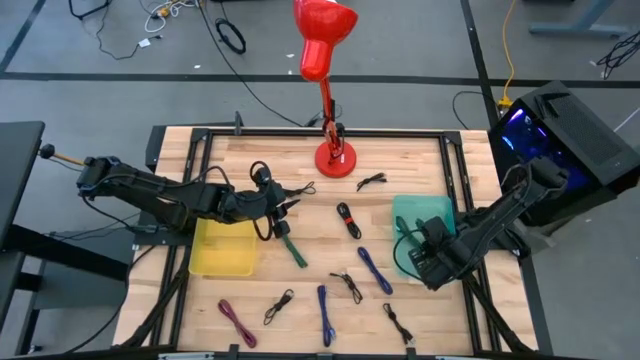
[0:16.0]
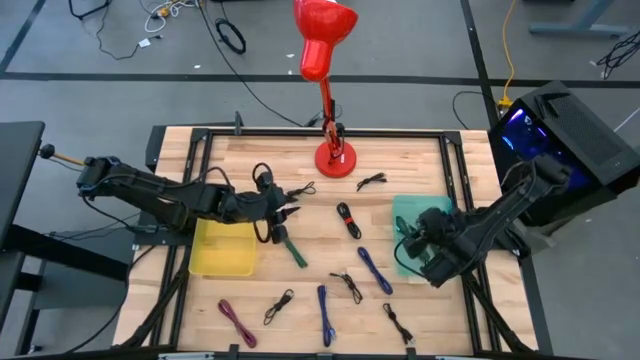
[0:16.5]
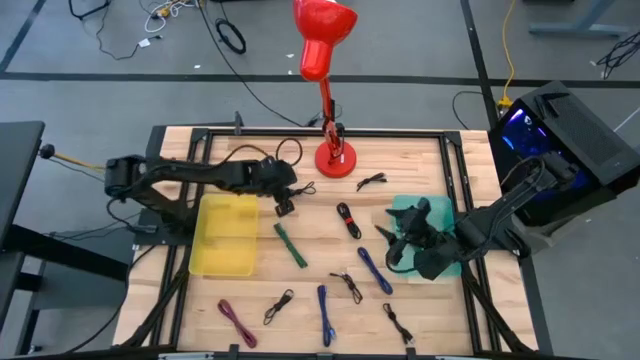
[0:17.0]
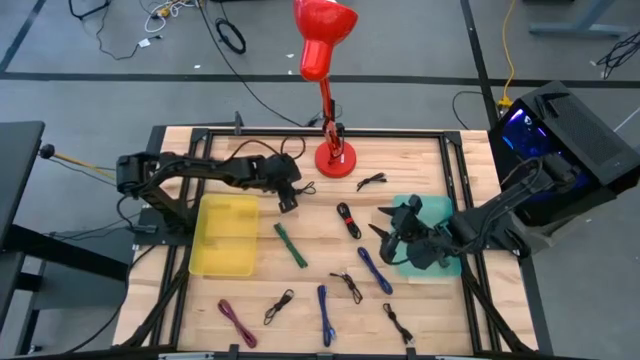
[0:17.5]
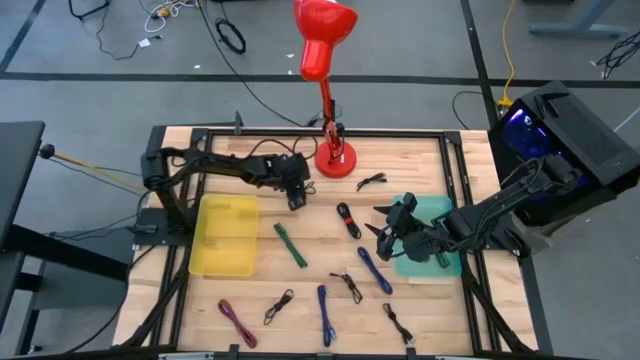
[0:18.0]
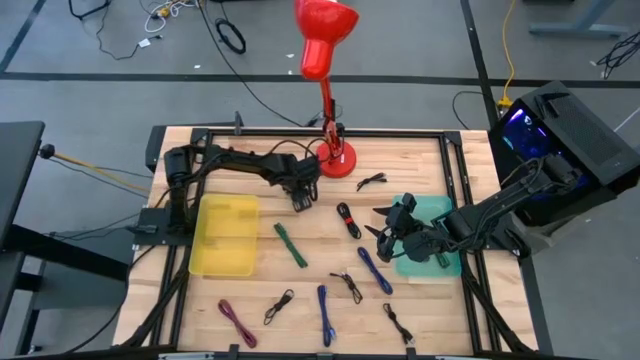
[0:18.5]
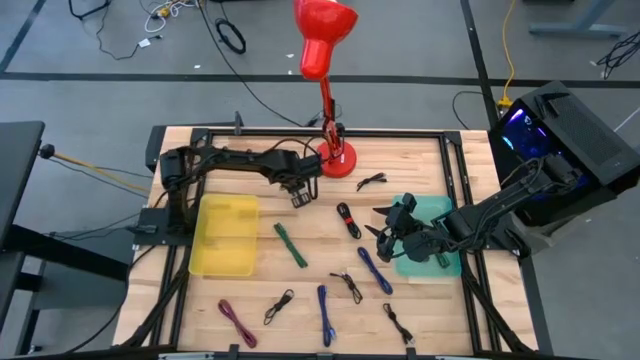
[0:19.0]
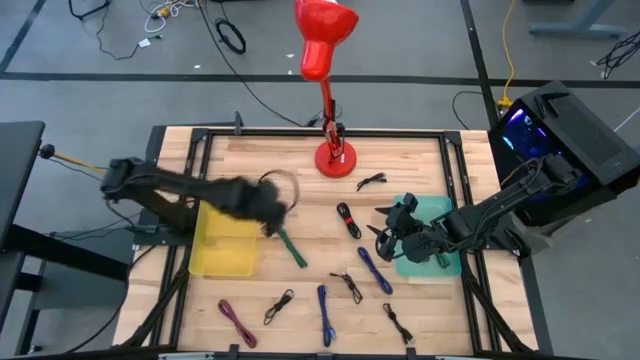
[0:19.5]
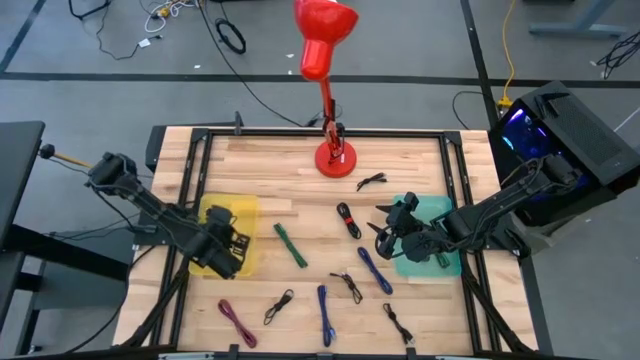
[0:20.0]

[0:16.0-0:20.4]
Task: Pick & Place USB Port
Put the black USB cable into the yellow transparent bin

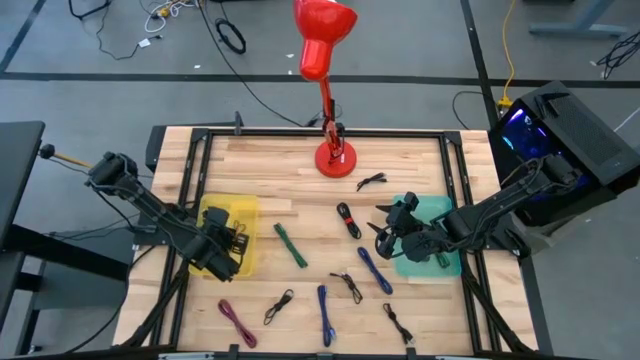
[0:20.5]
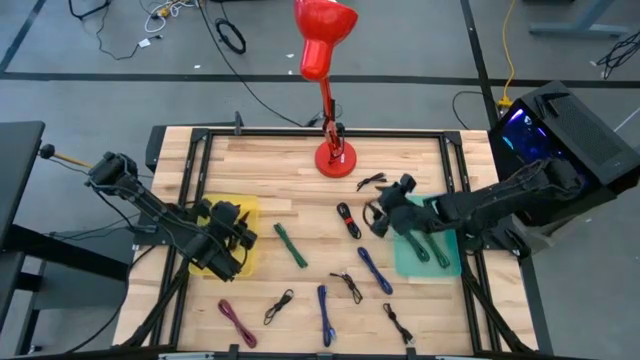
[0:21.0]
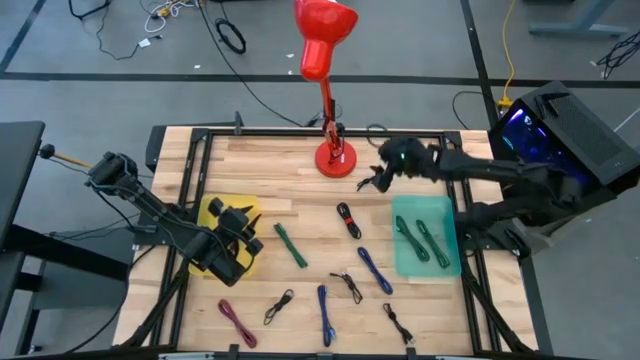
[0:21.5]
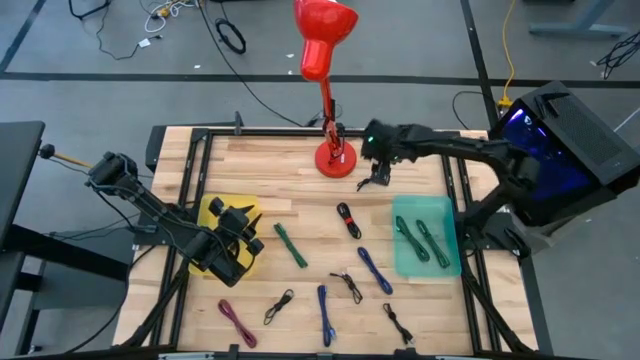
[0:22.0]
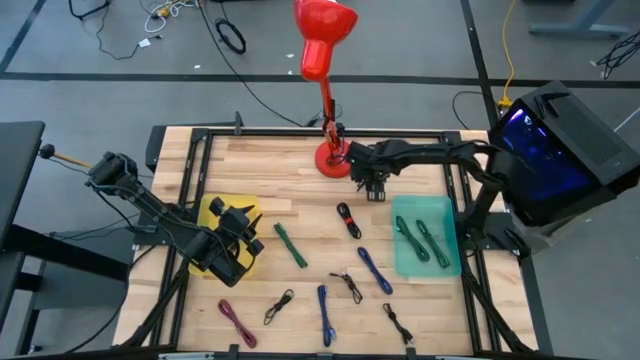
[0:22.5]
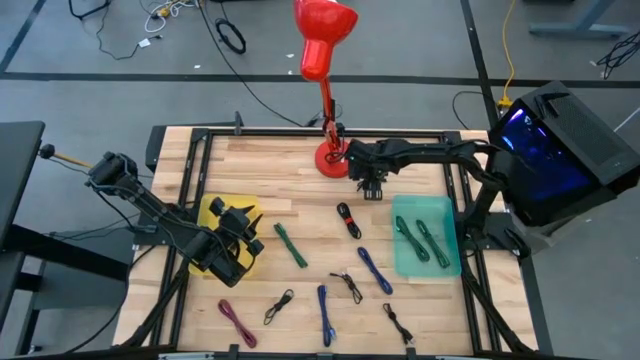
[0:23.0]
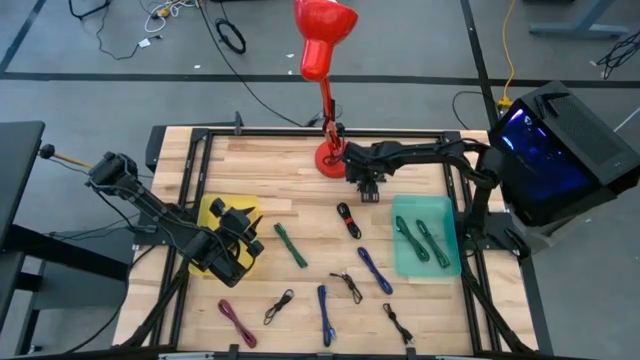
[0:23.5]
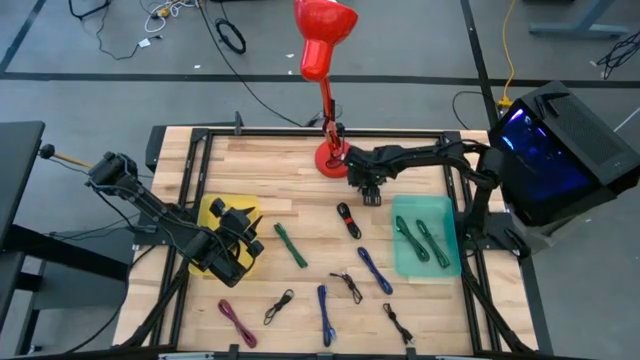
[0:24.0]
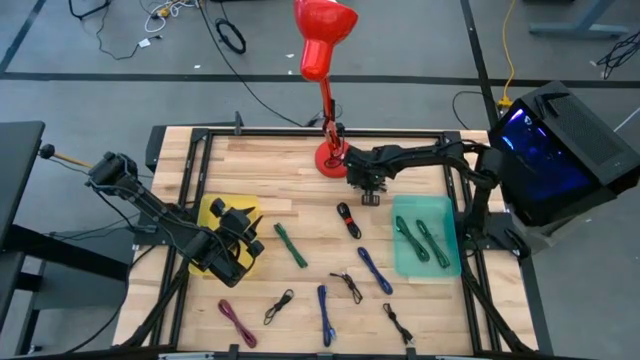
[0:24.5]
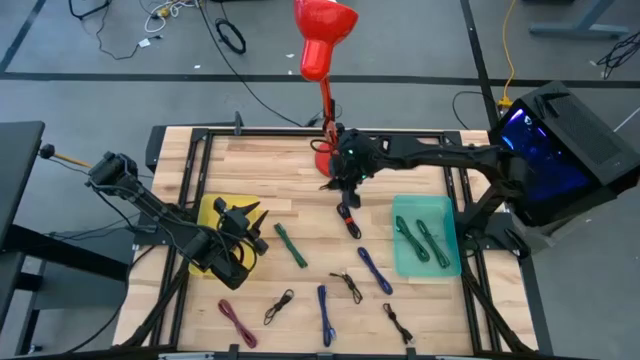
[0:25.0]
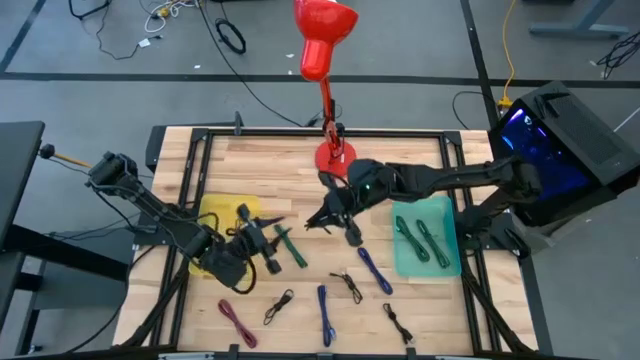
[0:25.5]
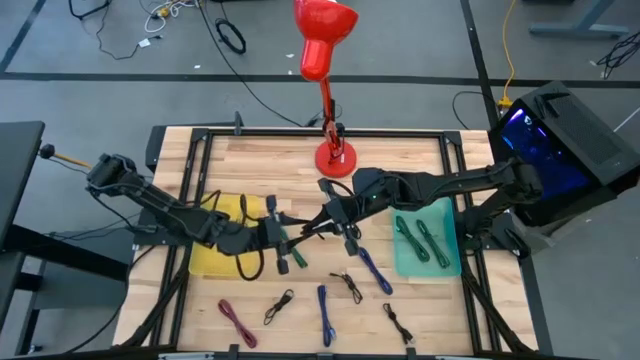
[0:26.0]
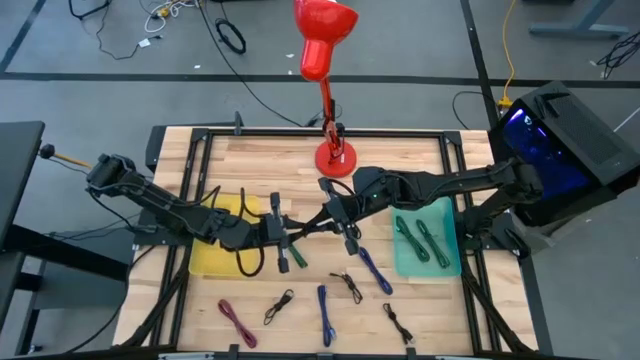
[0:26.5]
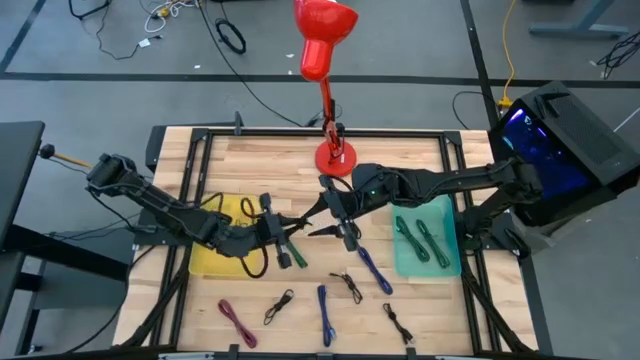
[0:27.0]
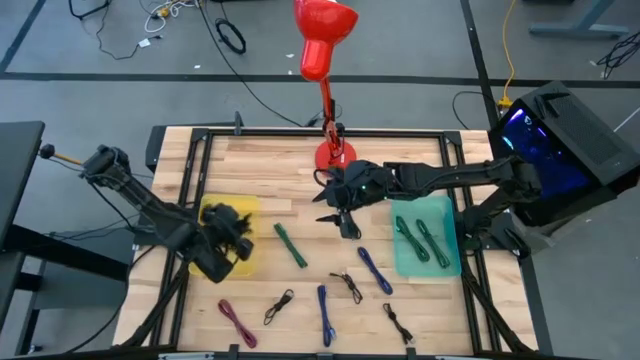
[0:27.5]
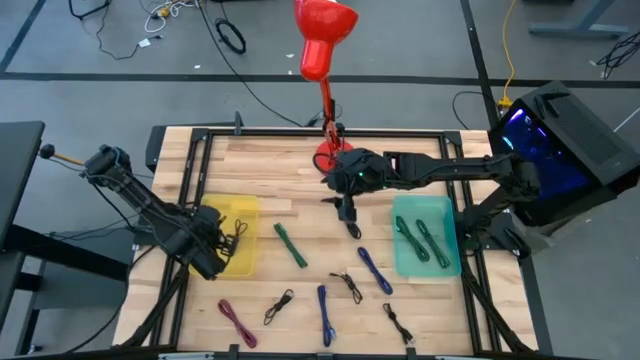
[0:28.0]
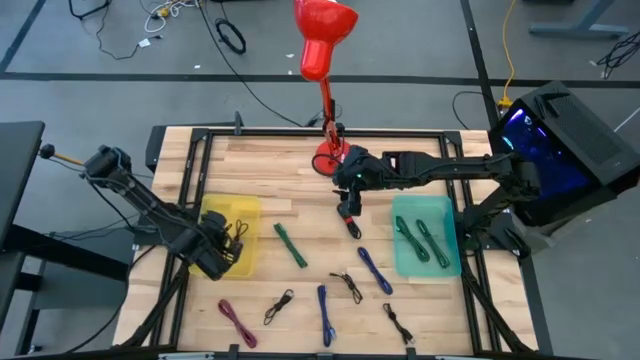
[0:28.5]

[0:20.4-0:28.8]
Put the black USB cable into the yellow transparent bin

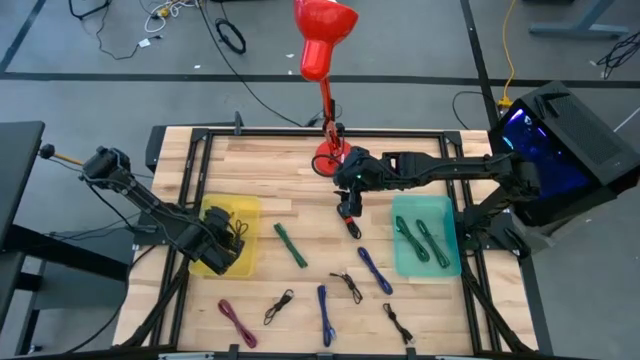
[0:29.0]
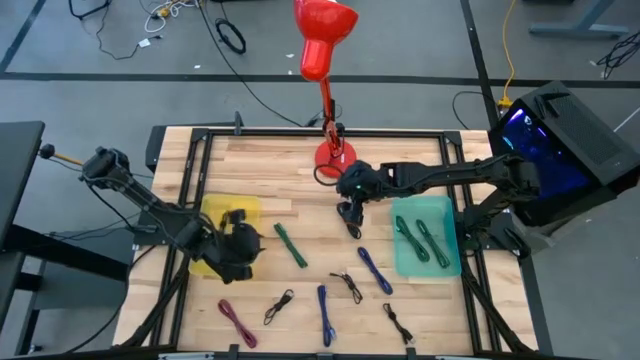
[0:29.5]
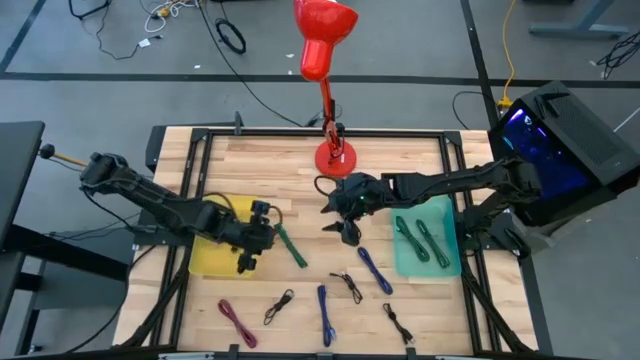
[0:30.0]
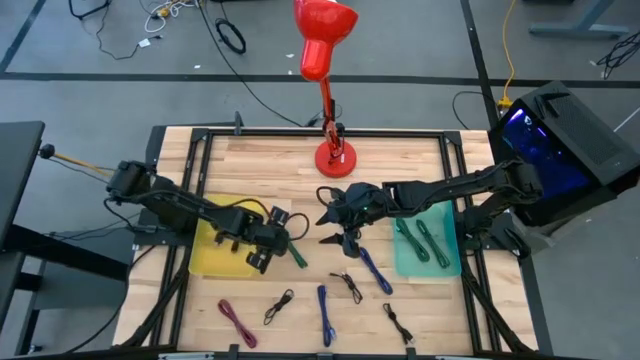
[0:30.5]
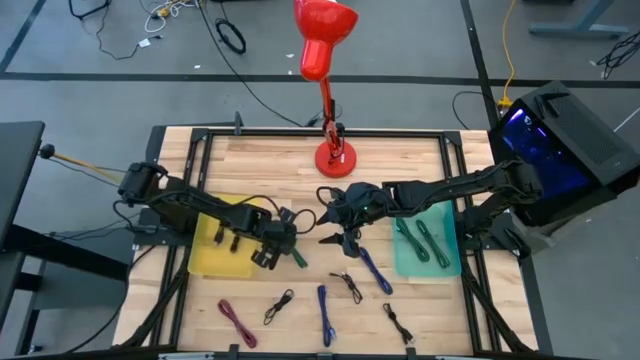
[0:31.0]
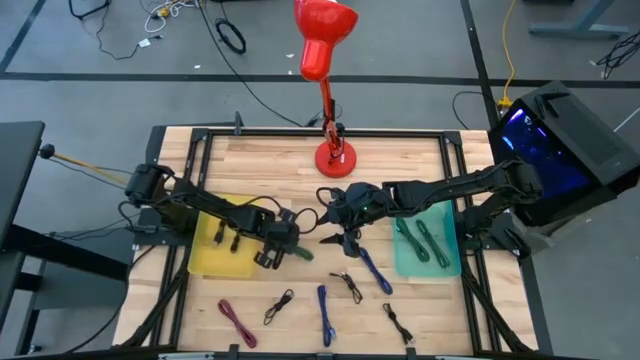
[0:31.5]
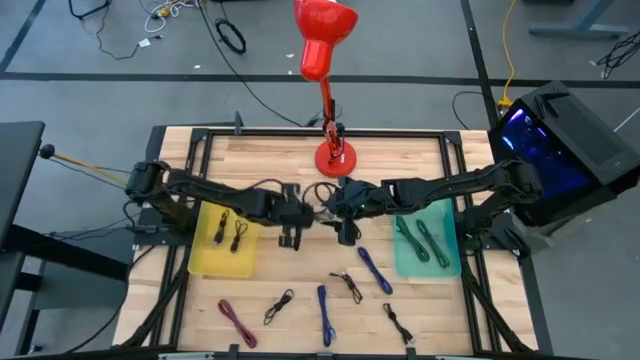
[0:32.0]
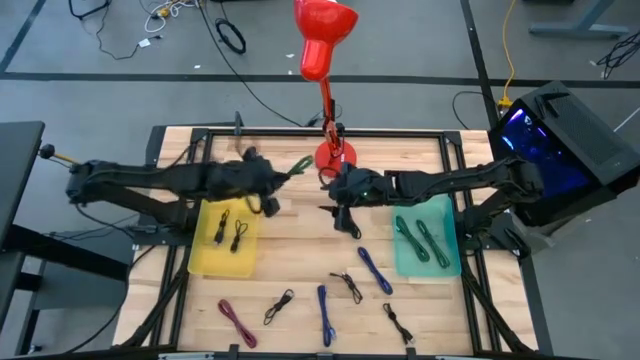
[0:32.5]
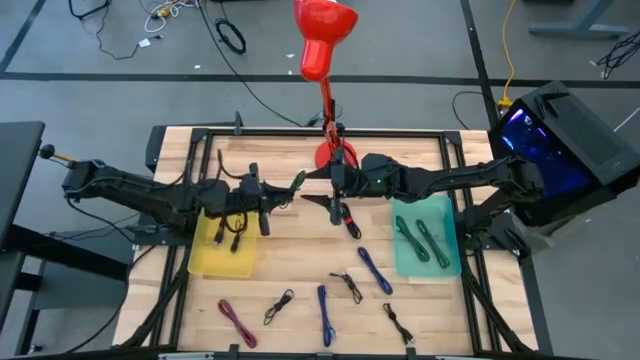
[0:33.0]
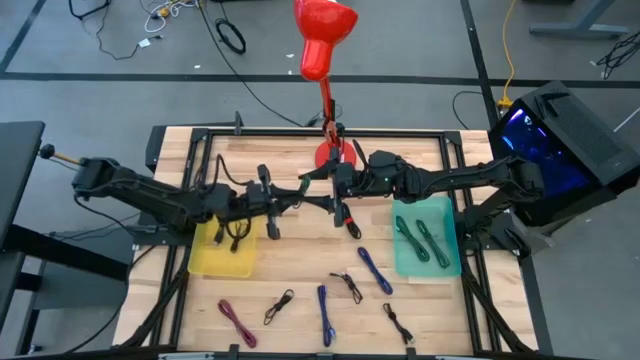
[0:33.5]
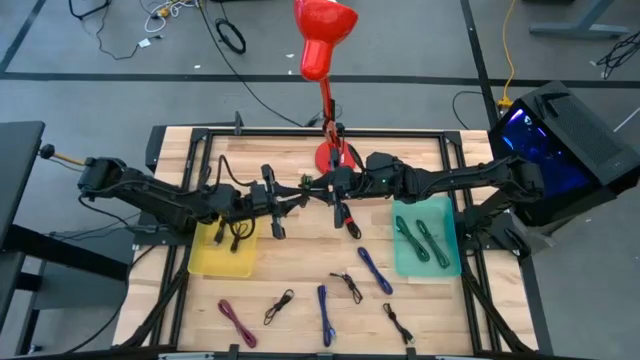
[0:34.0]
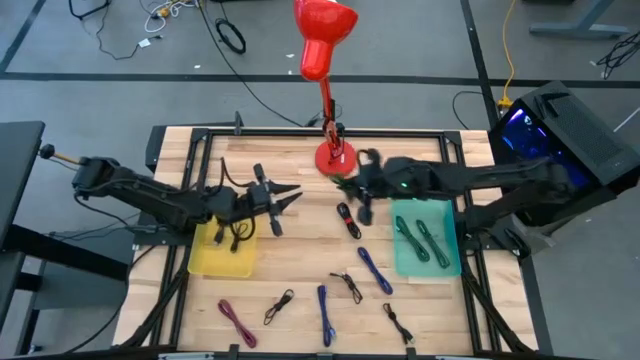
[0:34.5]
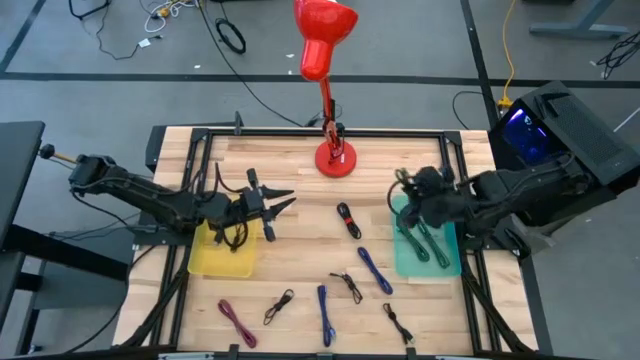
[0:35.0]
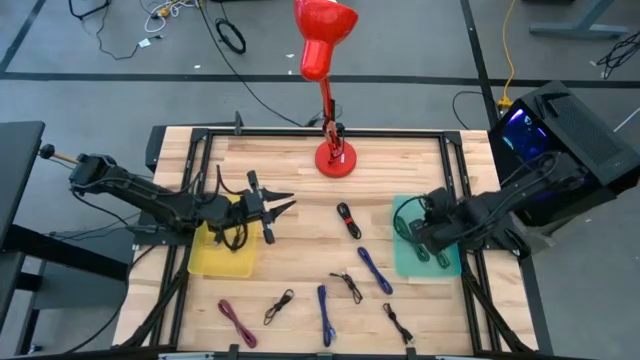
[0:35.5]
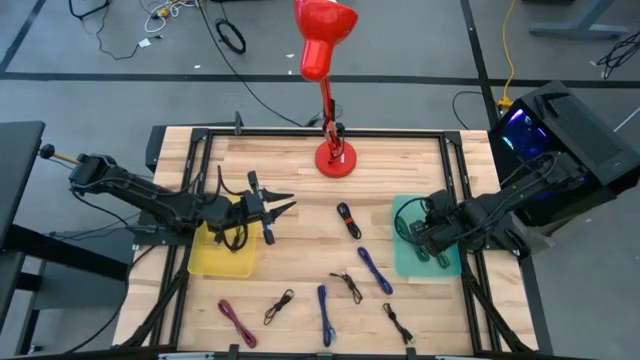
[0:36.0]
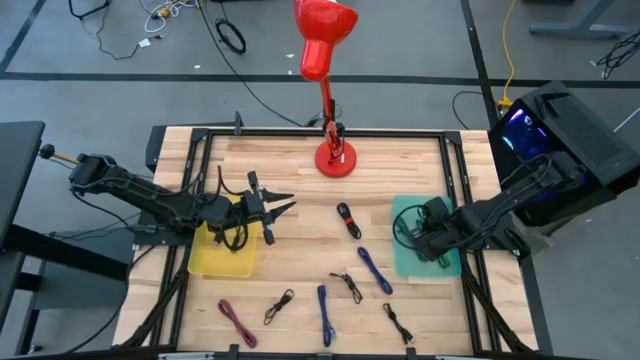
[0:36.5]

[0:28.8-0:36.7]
Put the green USB cable into the blue transparent bin

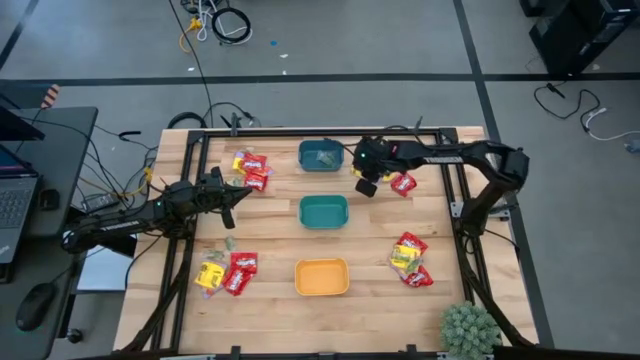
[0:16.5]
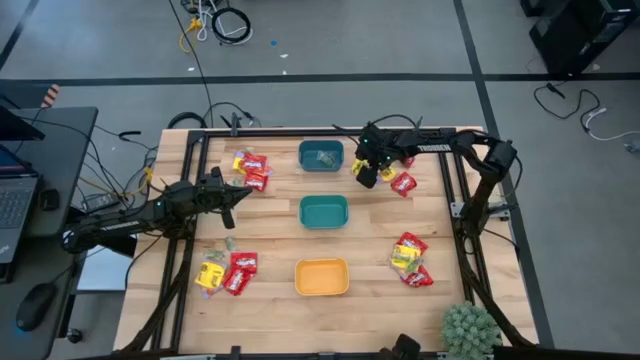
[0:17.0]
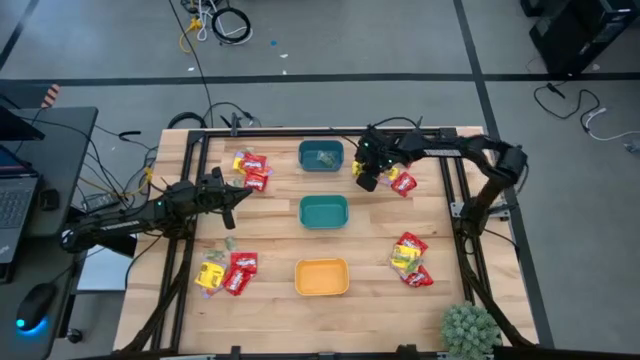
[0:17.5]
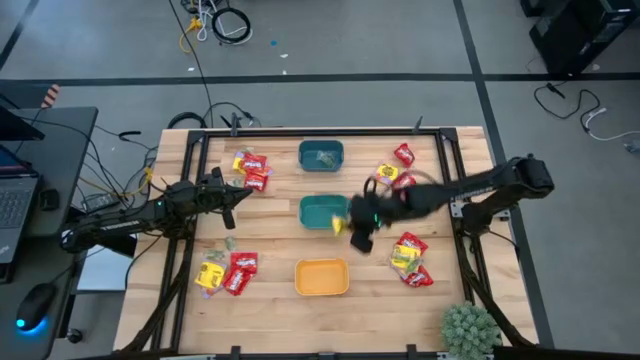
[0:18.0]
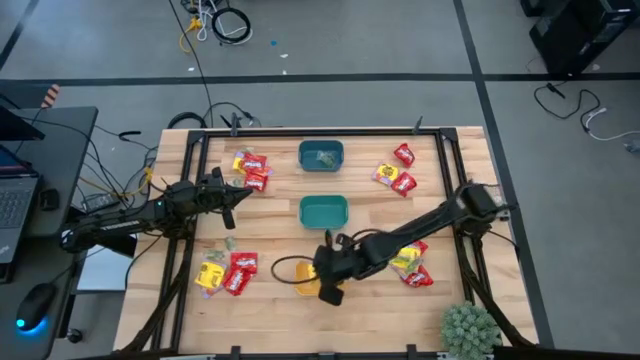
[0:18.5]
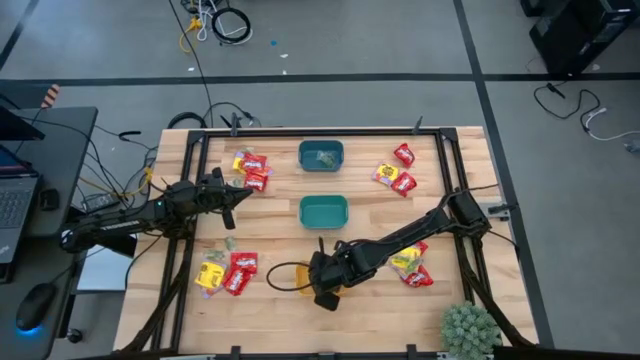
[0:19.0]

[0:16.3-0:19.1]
Task: Sort candy
Put the yellow candy into the yellow bin
